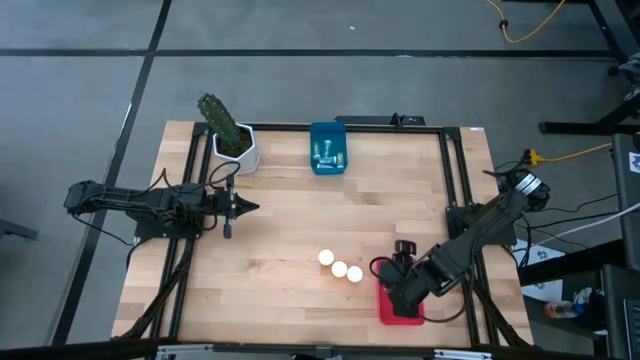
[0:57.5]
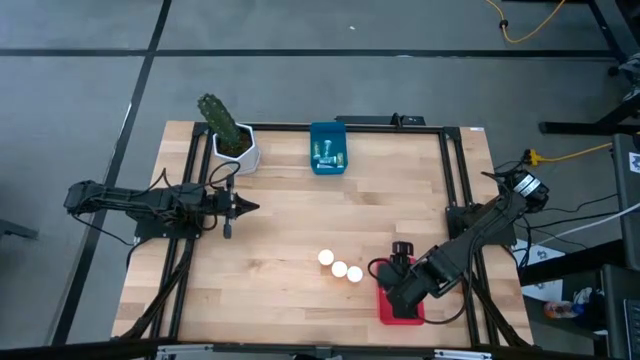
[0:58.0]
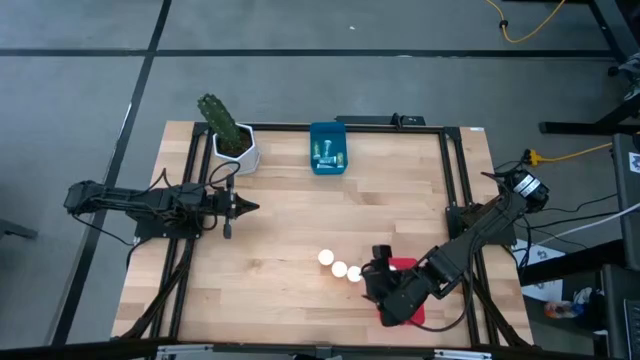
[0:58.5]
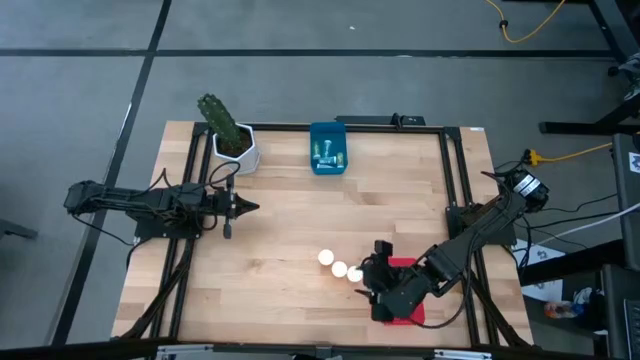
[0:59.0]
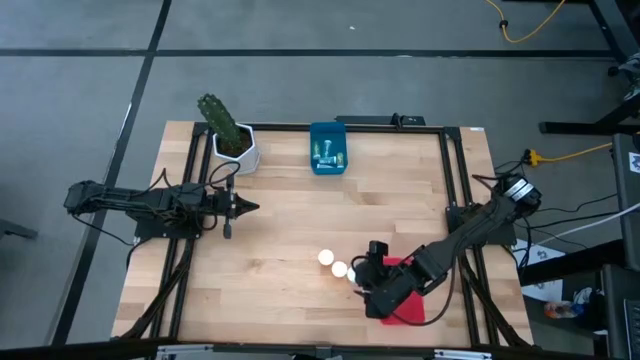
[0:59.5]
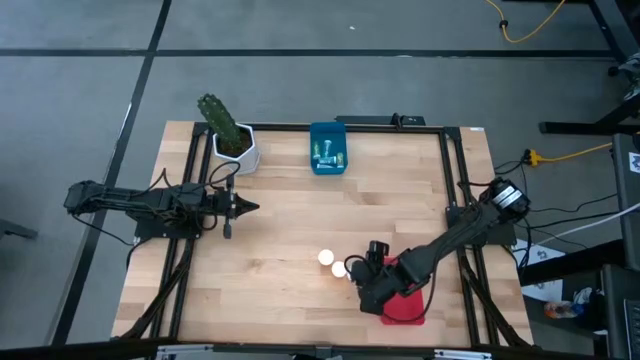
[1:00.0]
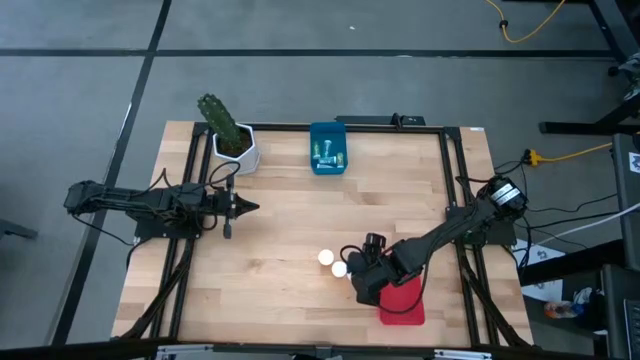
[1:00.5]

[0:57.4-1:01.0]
Task: Pick and place medicine bottles into bin by pill shape (circle, oval)
Put the large orange pill bottle into the red bin

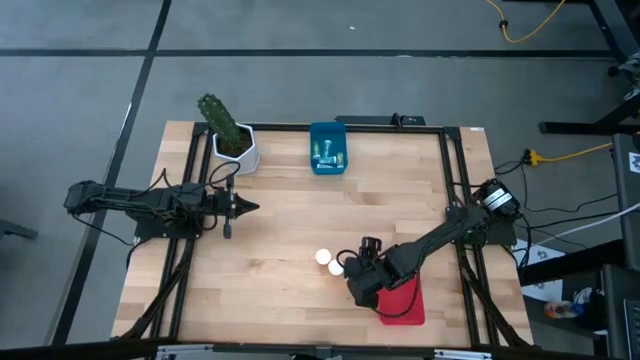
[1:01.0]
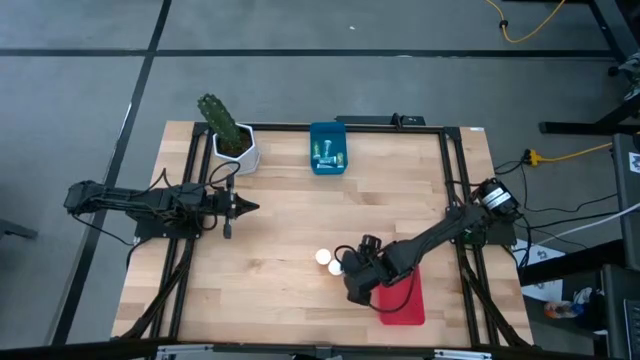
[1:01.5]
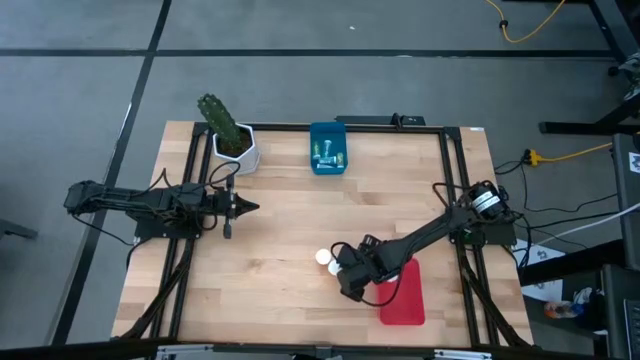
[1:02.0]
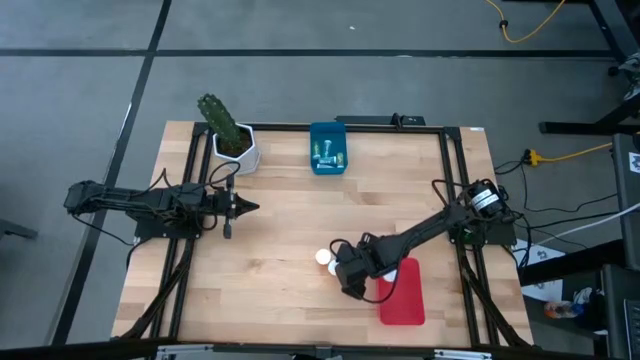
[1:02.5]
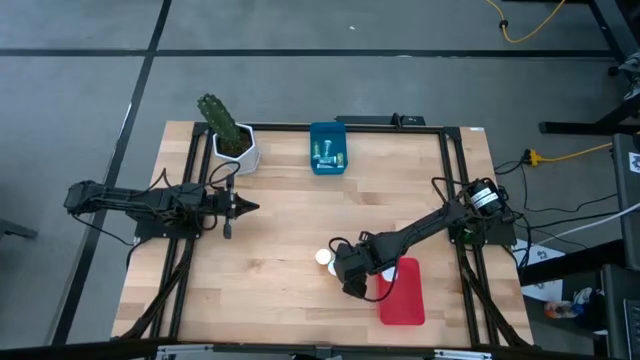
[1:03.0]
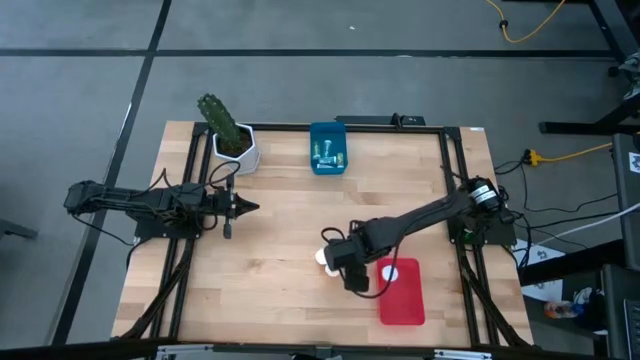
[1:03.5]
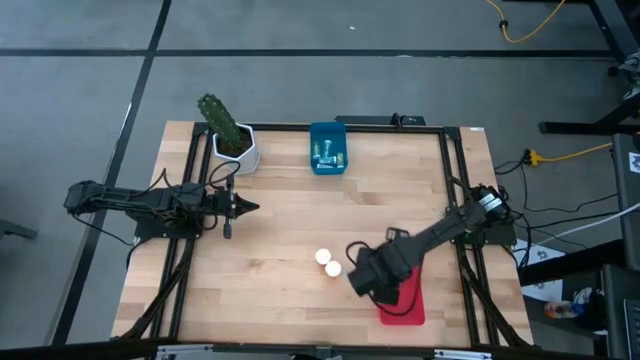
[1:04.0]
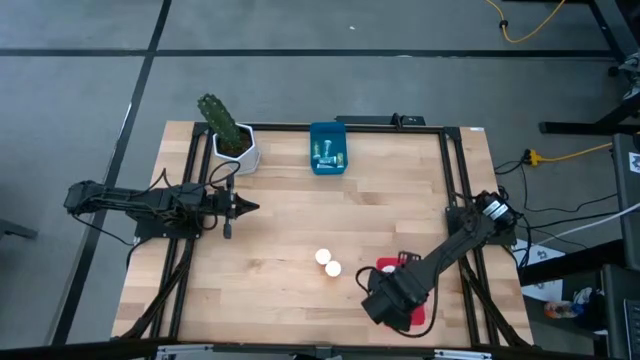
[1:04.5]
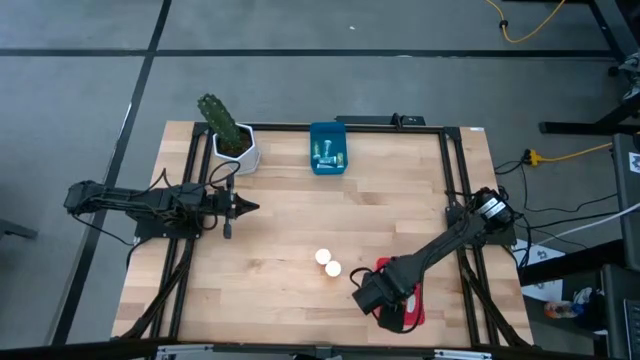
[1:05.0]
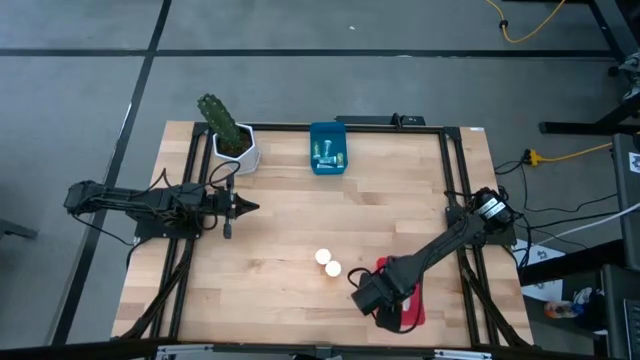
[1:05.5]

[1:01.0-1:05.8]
Put the large orange pill bottle into the red bin

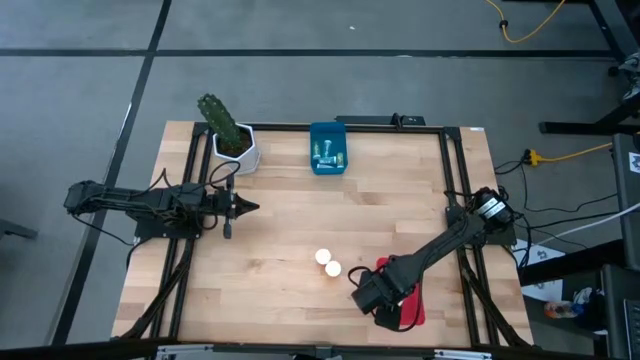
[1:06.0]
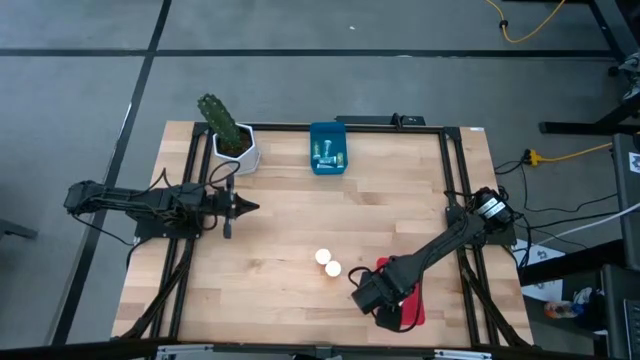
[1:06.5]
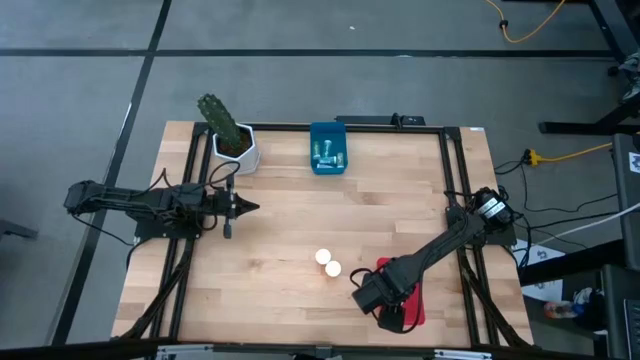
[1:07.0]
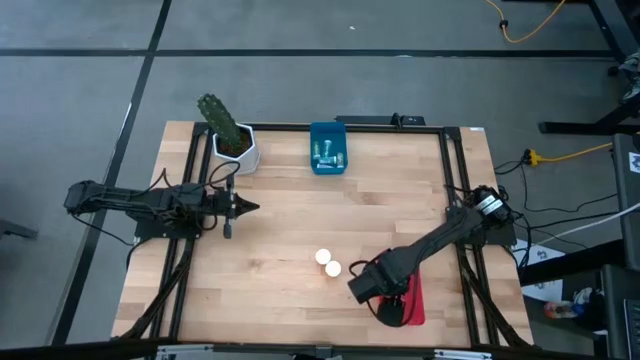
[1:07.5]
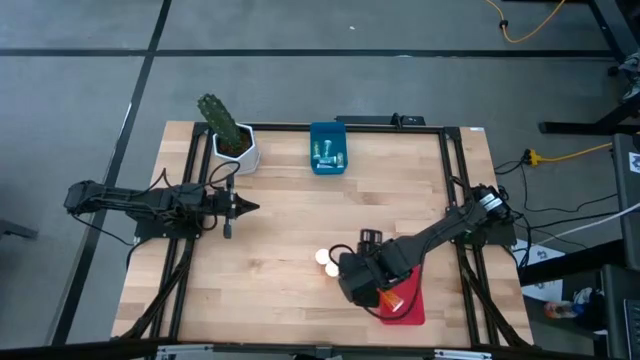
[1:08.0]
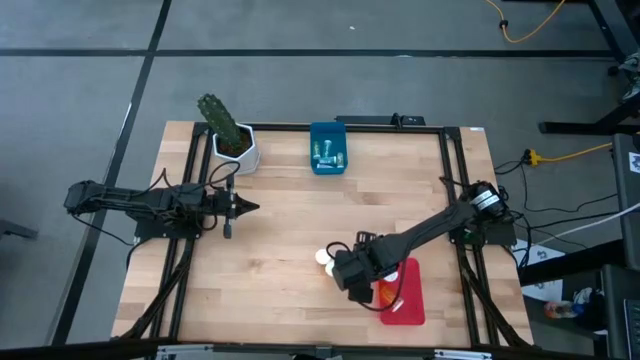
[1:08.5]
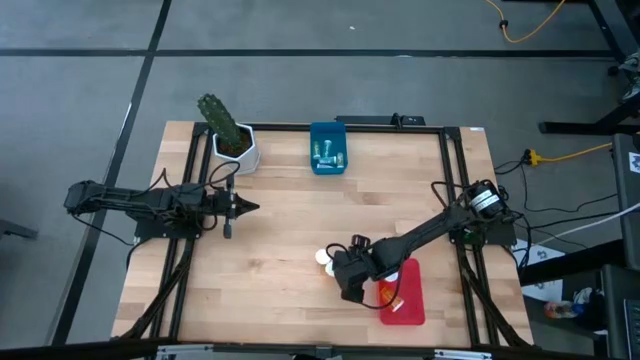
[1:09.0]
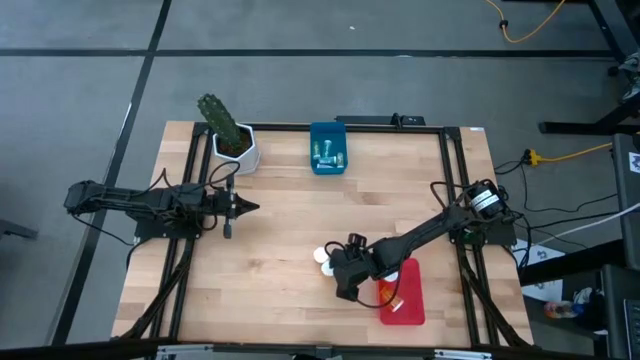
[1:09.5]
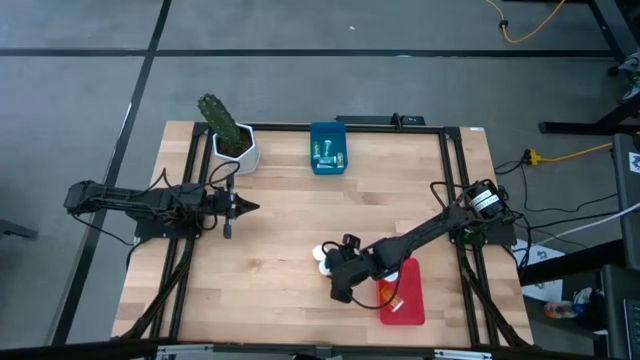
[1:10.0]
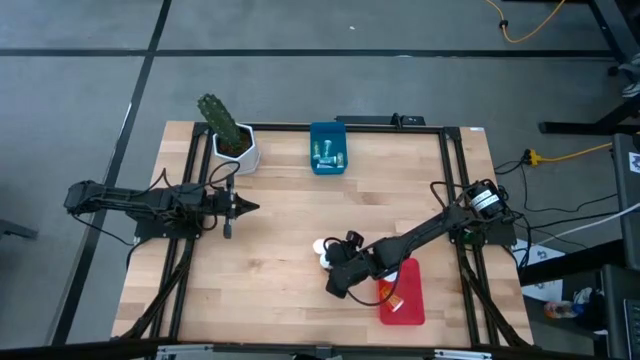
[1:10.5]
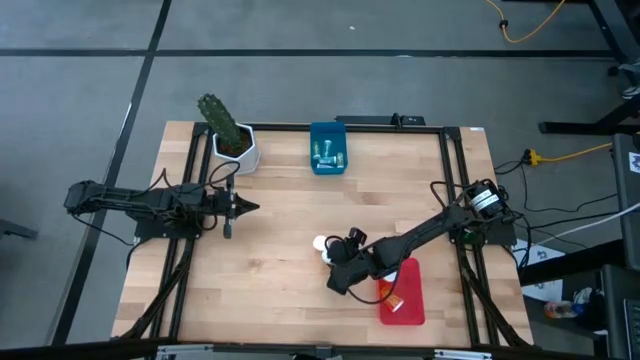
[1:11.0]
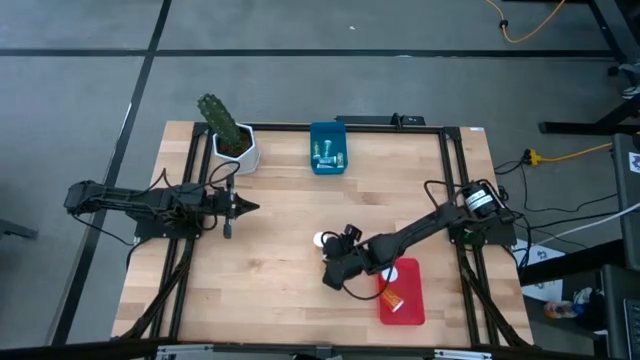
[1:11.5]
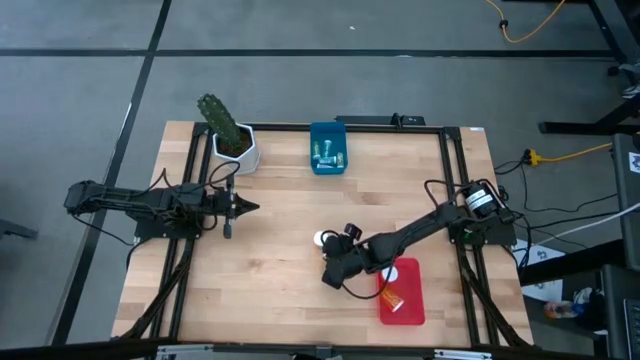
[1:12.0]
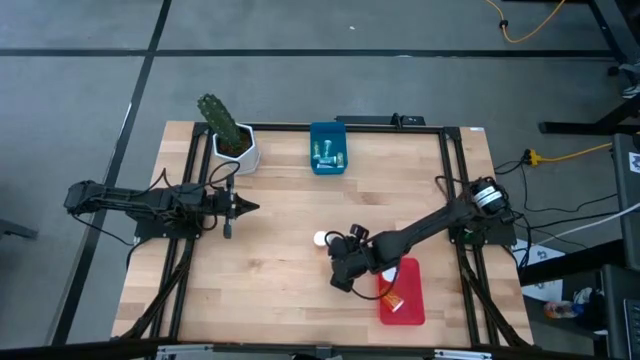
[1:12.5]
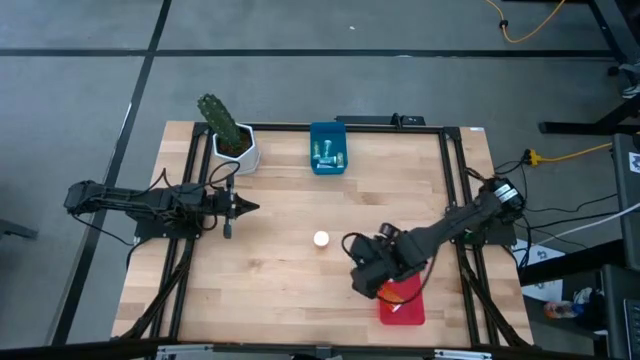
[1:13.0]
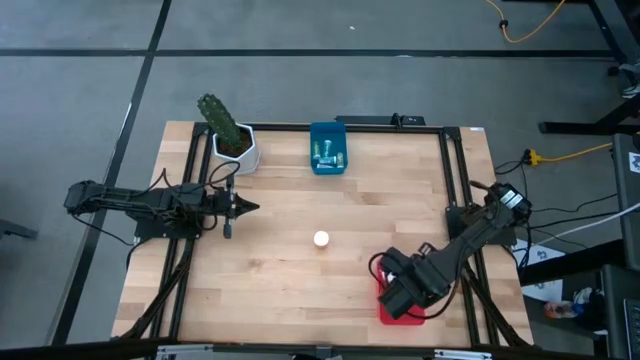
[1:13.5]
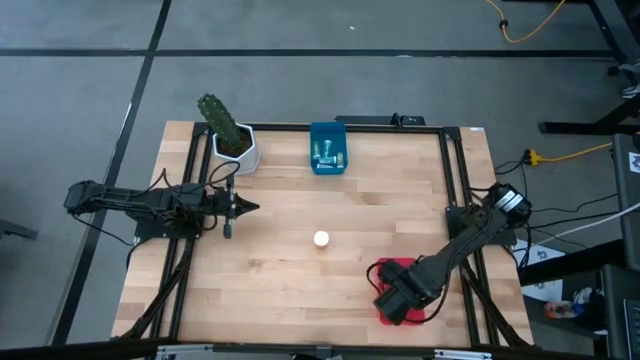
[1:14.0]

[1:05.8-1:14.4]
Put the large orange pill bottle into the red bin

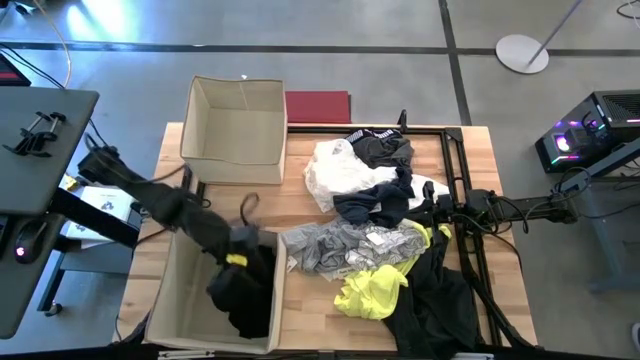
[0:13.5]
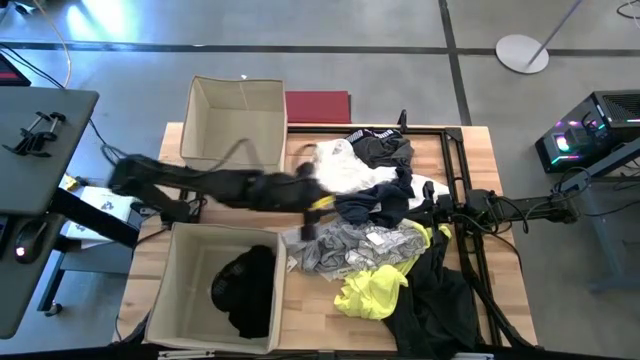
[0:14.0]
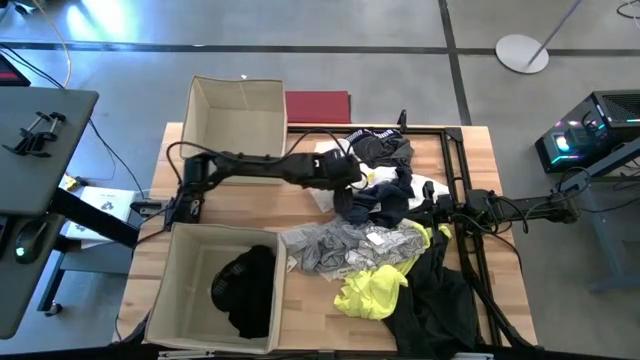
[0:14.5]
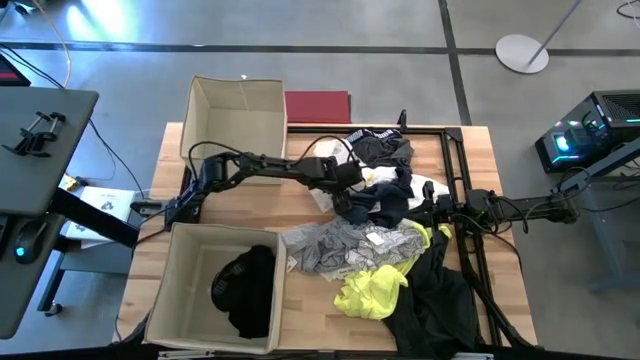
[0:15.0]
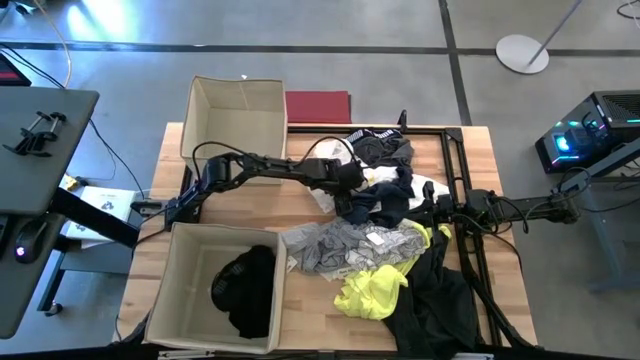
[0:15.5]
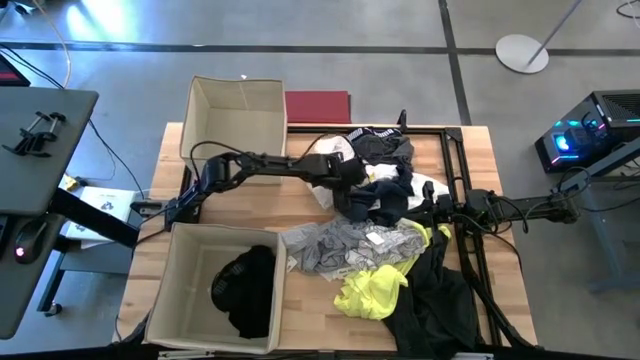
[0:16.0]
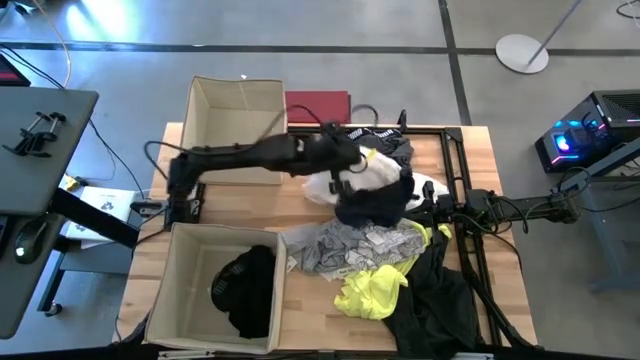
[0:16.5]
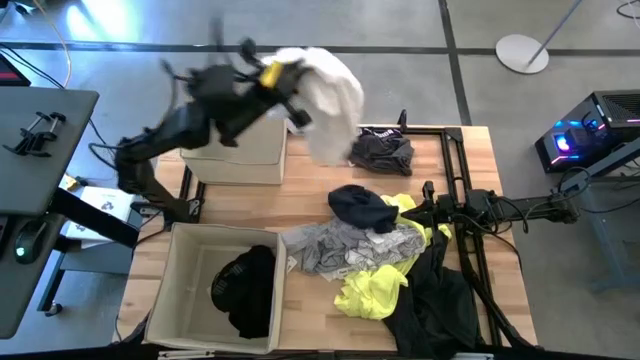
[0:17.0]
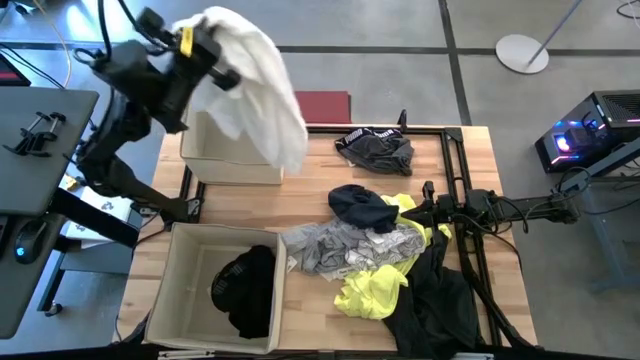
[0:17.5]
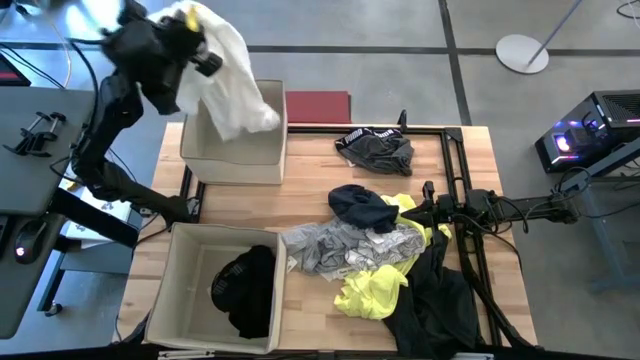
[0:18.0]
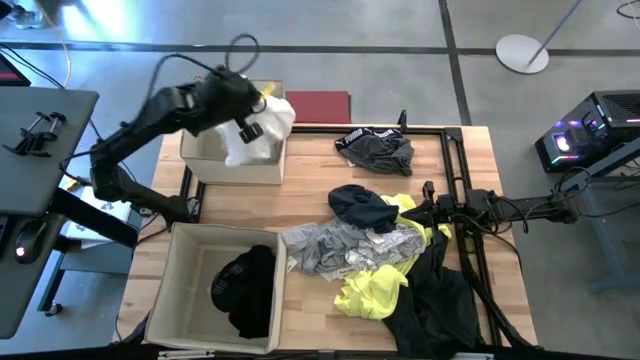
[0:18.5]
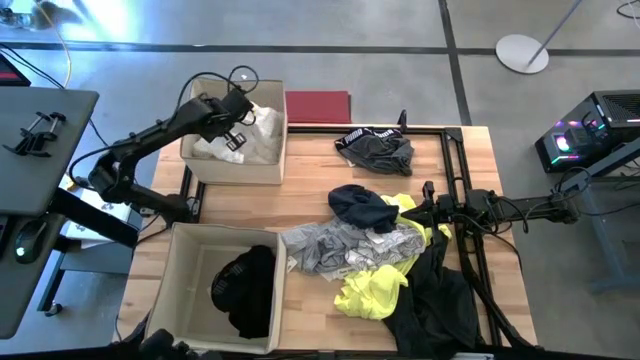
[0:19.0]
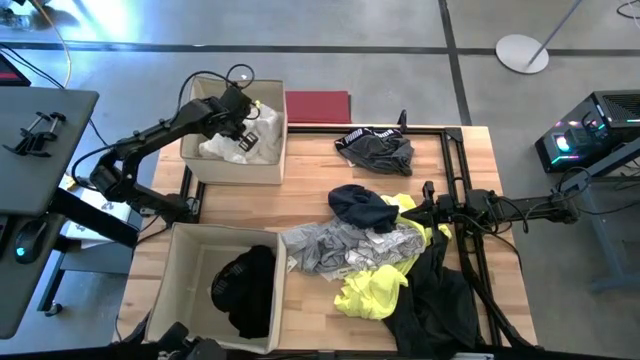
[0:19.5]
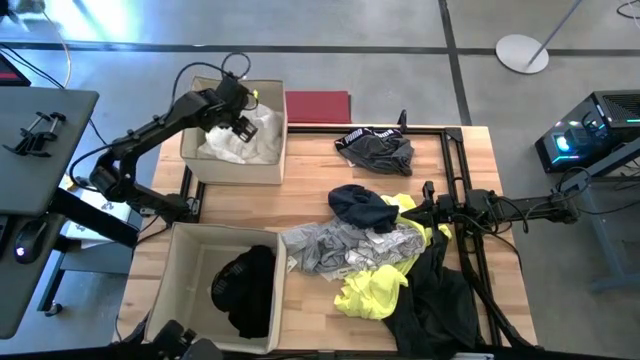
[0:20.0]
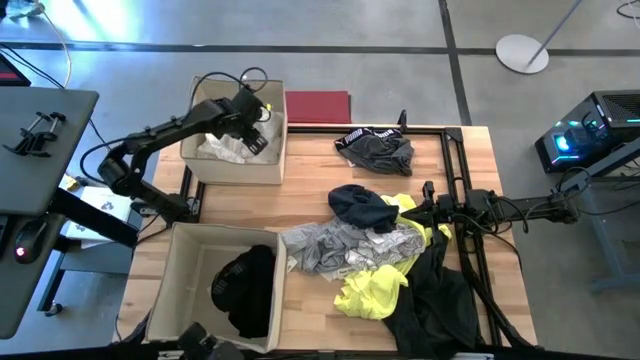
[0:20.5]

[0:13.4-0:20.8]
Task: Sort clothes
Put the white shirt into the top laundry organizer
